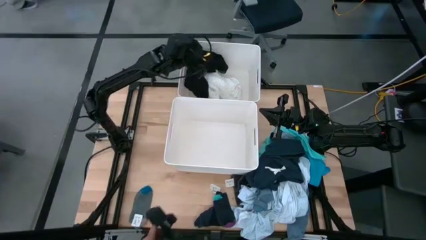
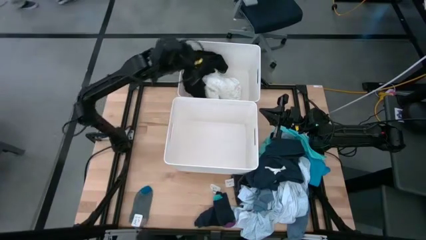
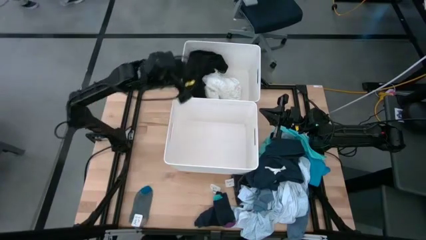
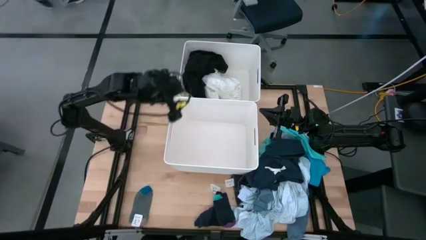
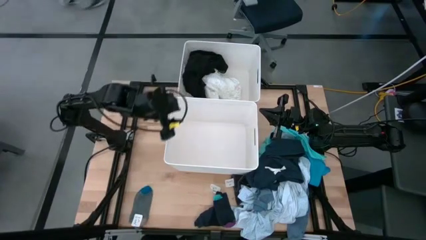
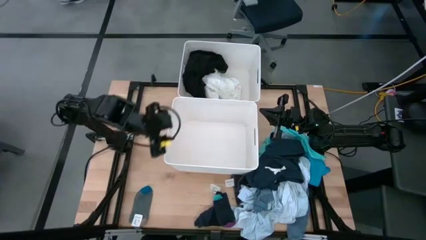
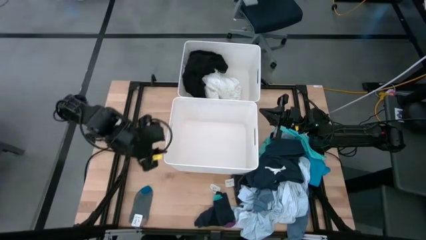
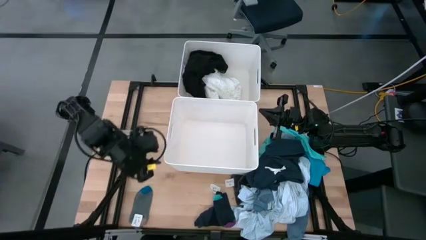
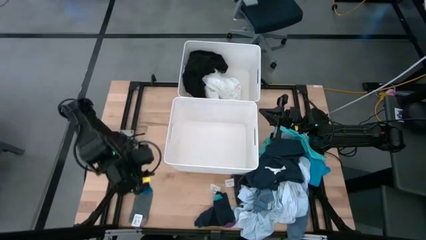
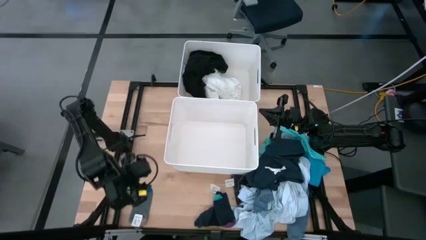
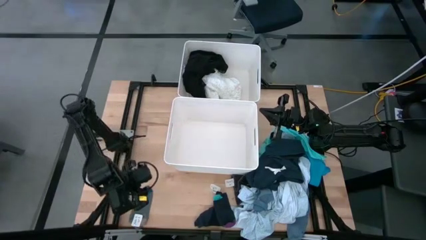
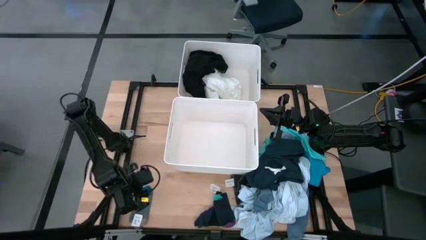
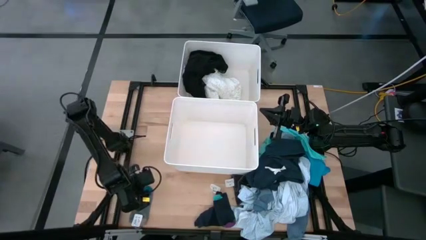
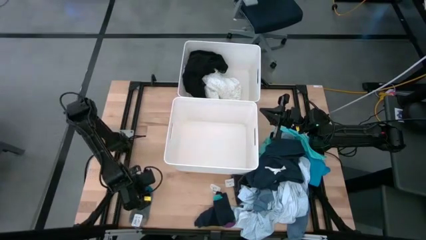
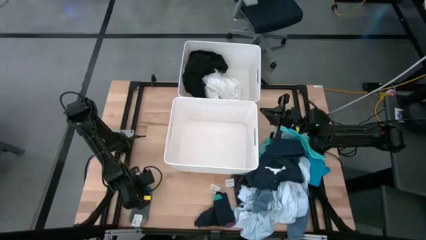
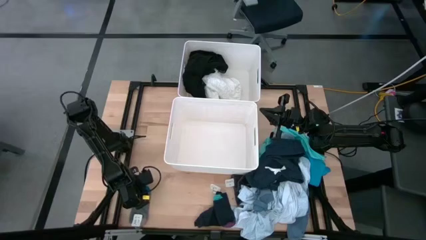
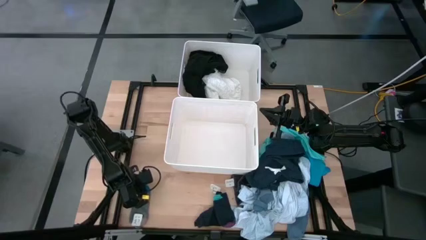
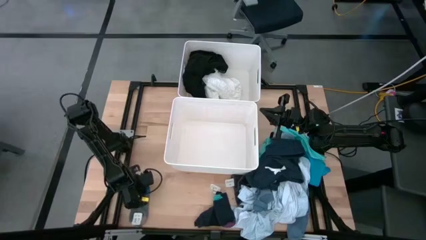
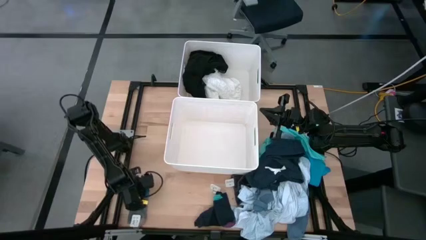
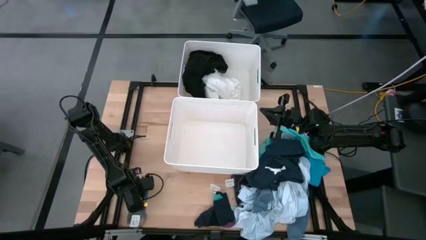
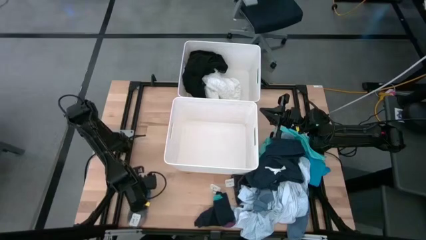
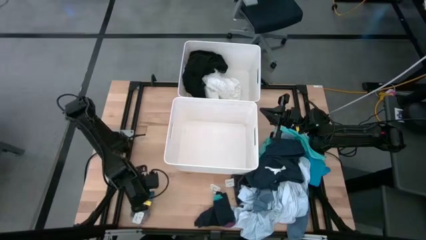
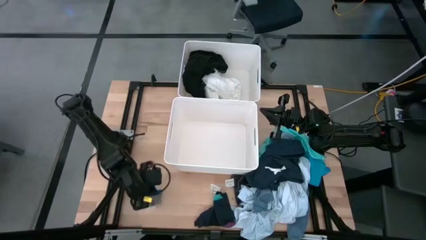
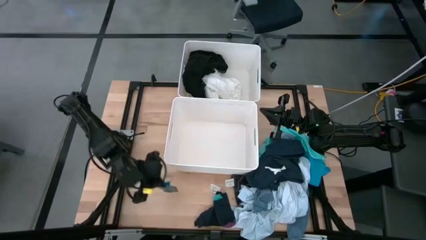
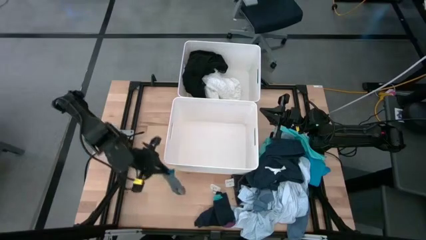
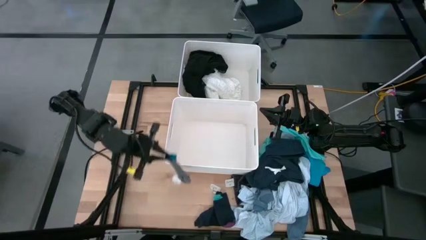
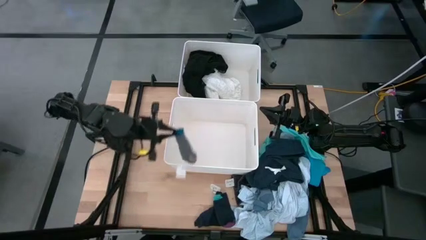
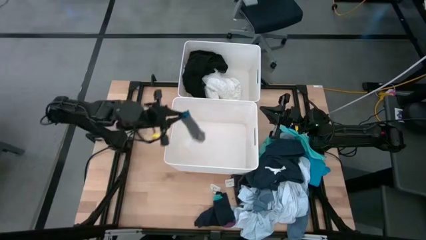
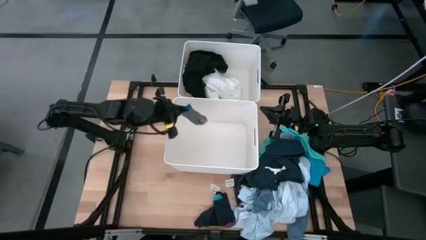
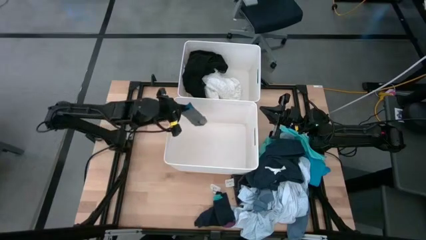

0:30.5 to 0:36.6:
Task: Sort clothes
Put the gray sock into the bottom white bin

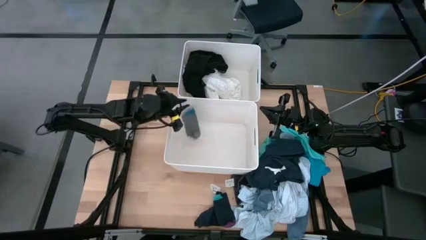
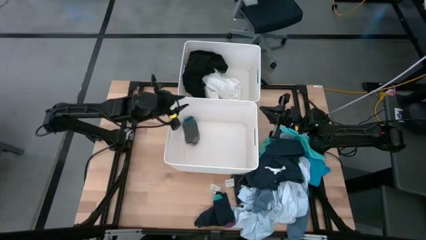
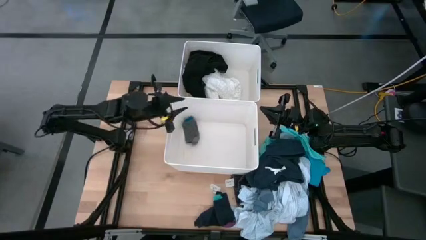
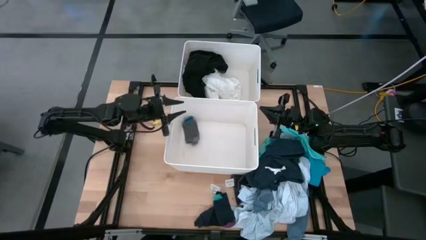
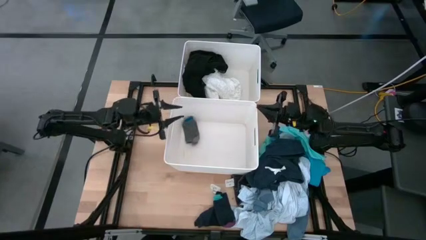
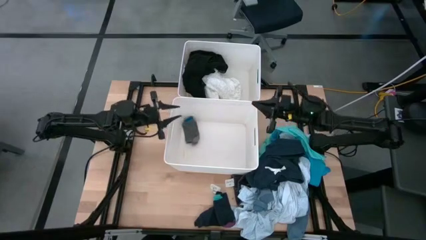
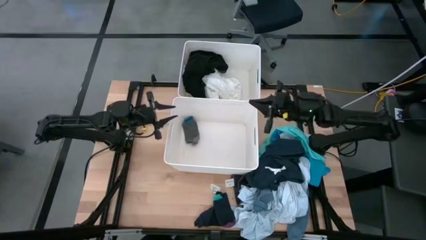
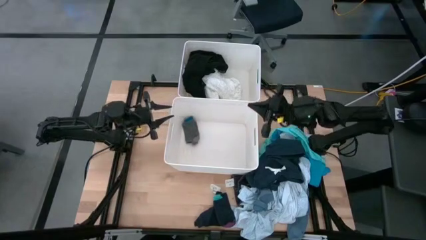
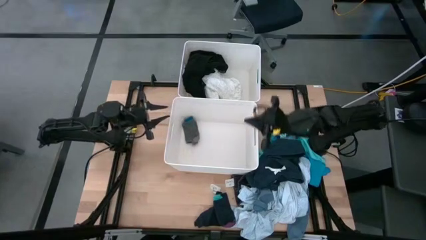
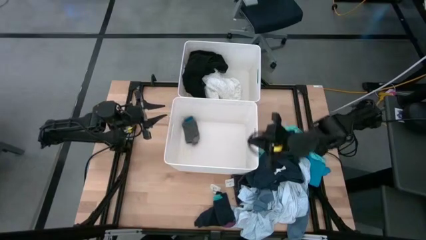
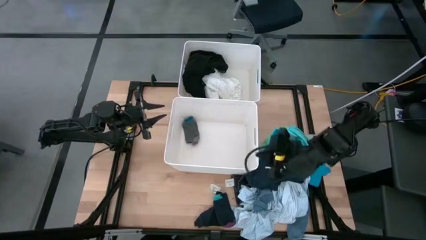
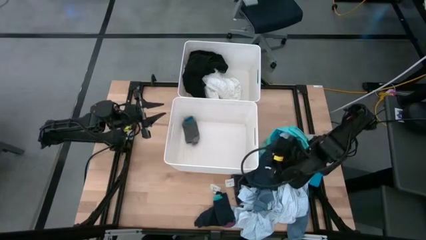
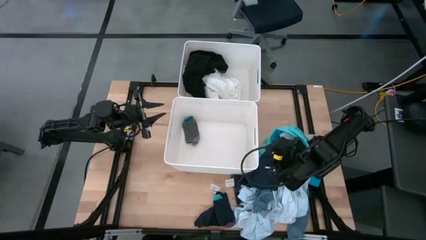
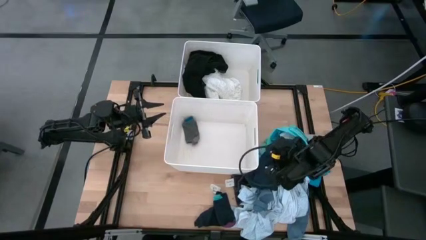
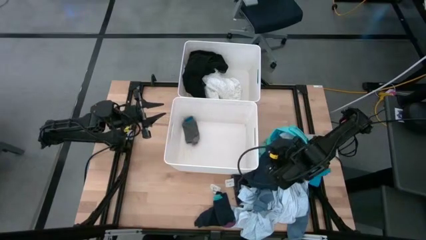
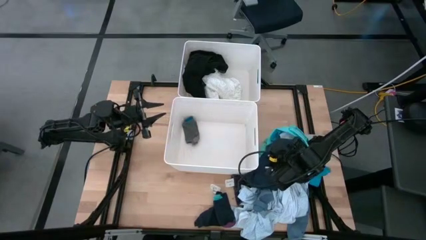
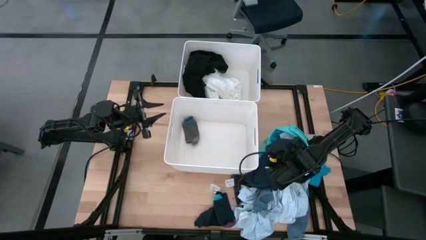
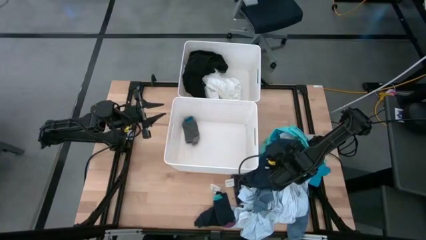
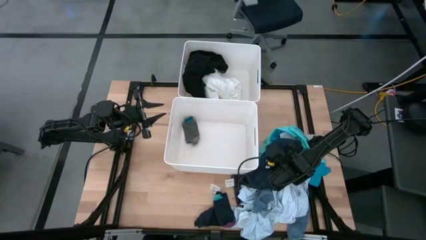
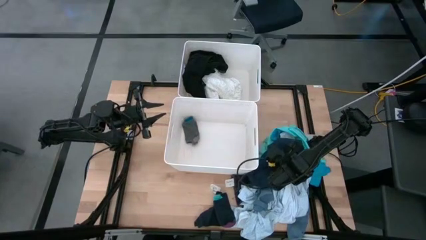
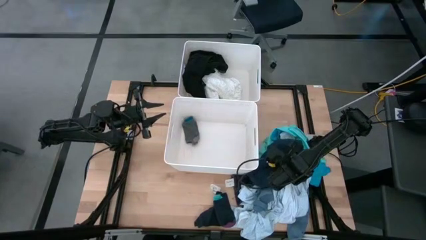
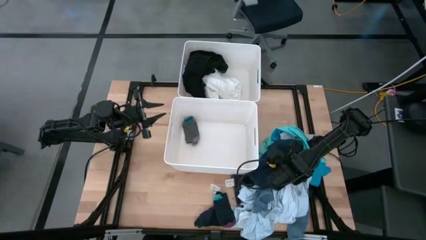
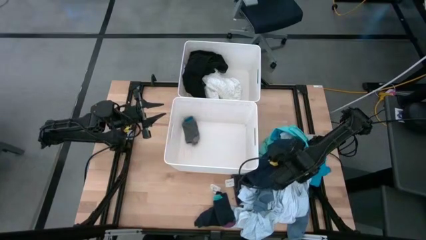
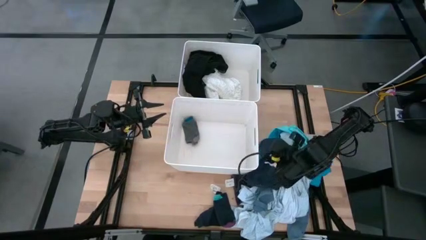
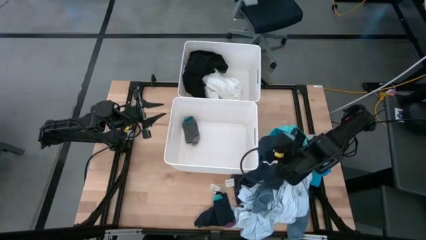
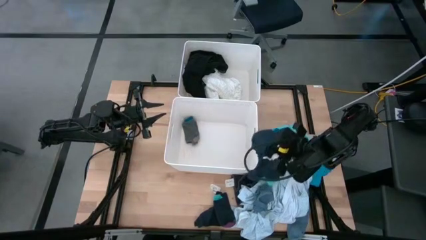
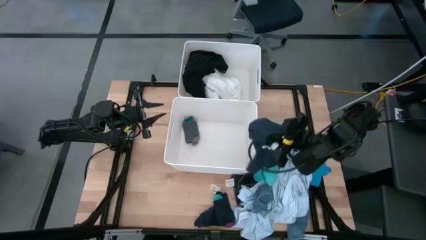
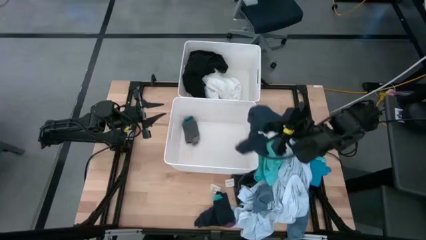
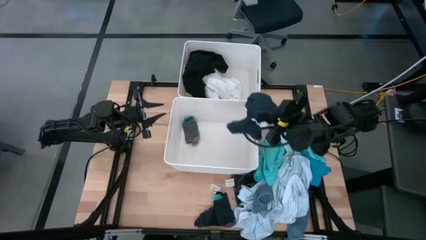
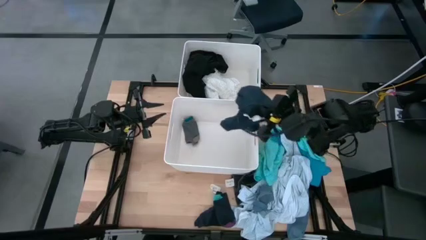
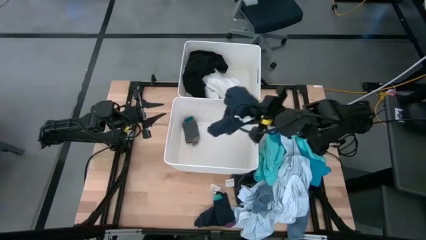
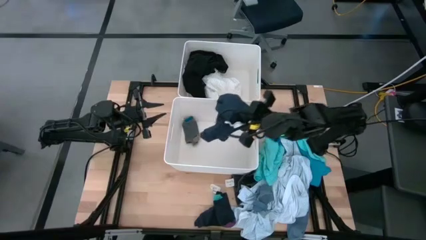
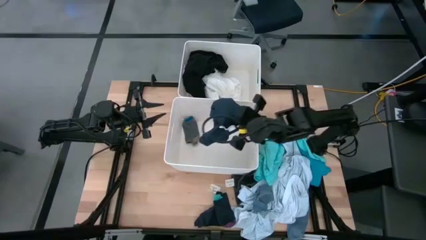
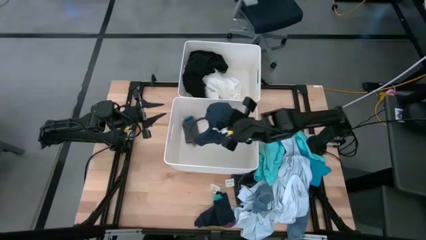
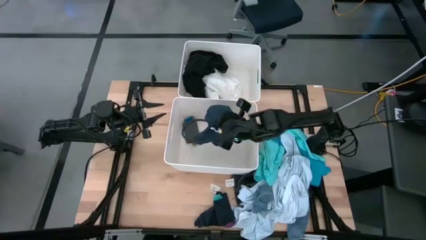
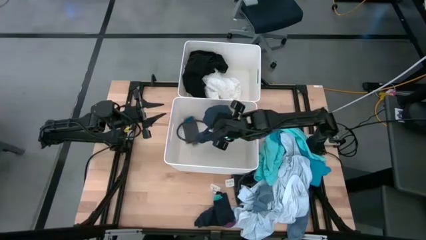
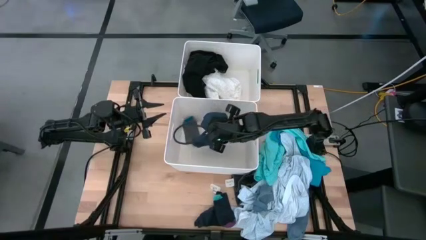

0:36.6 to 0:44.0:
Put the gray shorts into the bottom white bin
